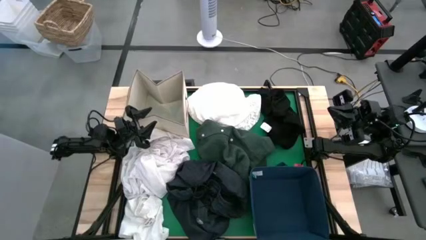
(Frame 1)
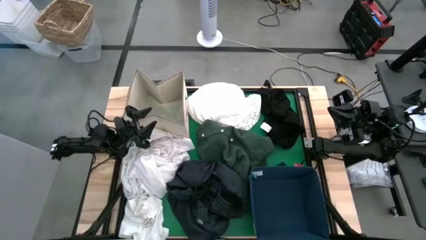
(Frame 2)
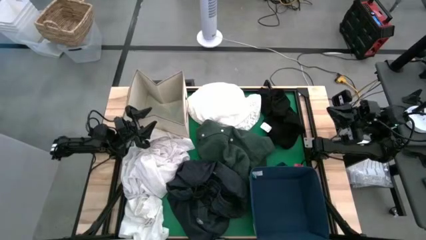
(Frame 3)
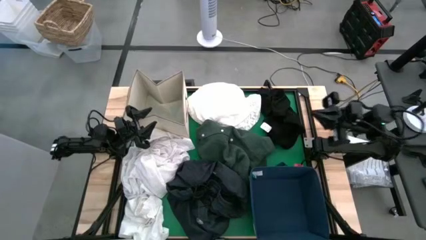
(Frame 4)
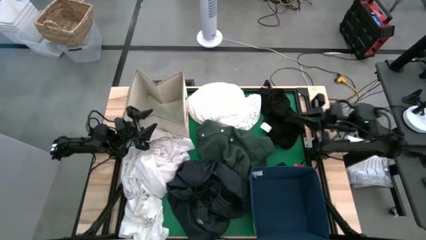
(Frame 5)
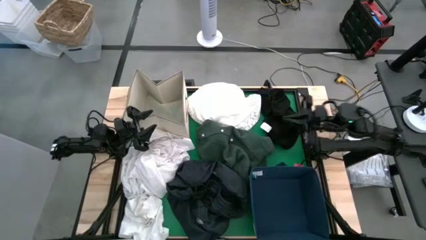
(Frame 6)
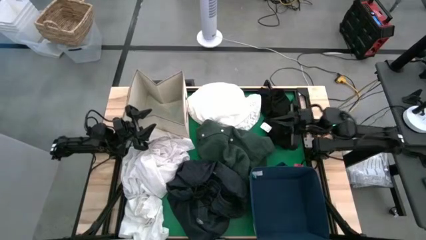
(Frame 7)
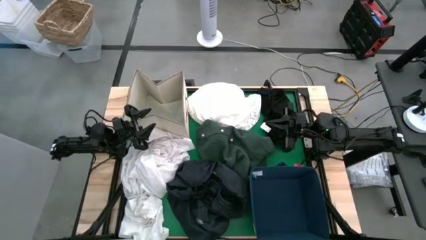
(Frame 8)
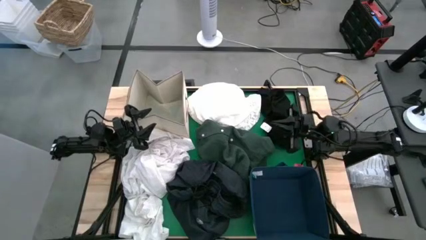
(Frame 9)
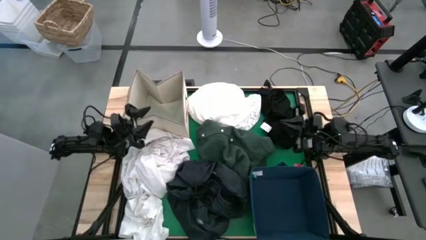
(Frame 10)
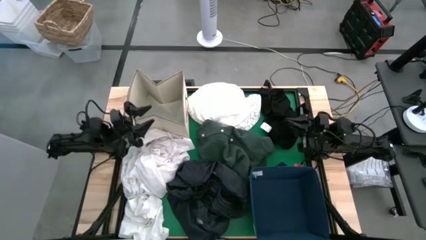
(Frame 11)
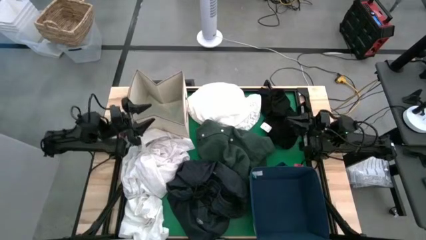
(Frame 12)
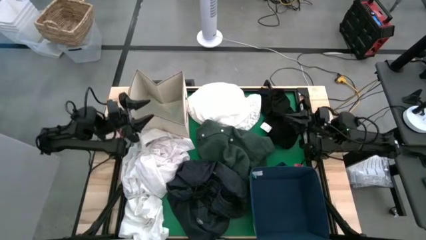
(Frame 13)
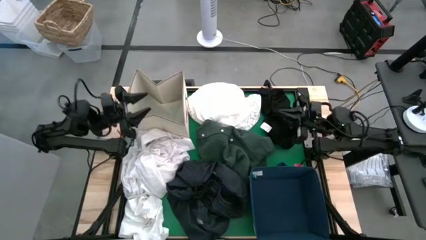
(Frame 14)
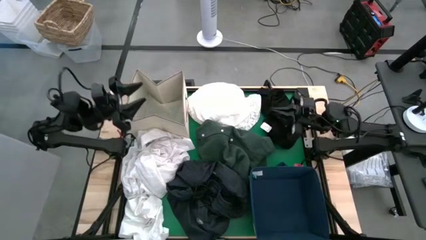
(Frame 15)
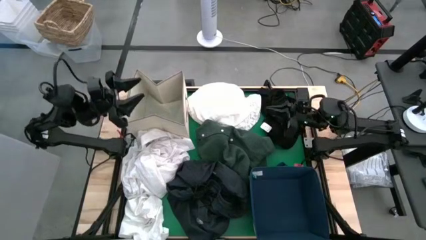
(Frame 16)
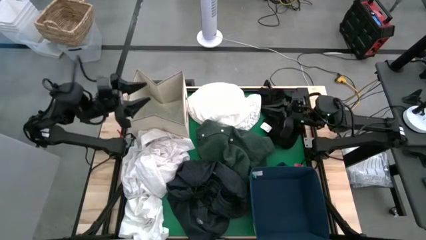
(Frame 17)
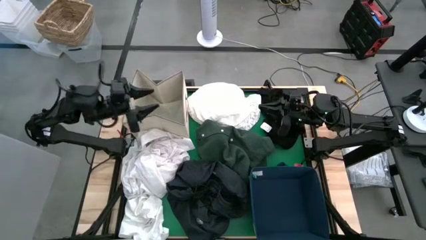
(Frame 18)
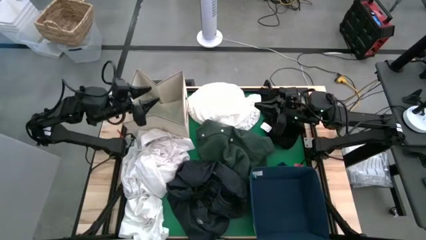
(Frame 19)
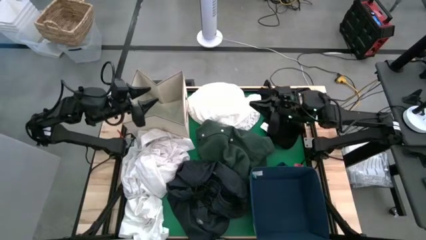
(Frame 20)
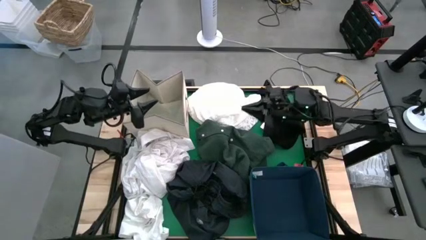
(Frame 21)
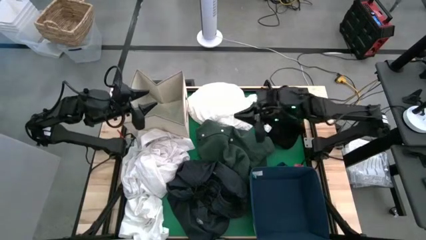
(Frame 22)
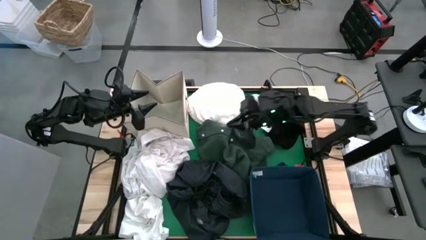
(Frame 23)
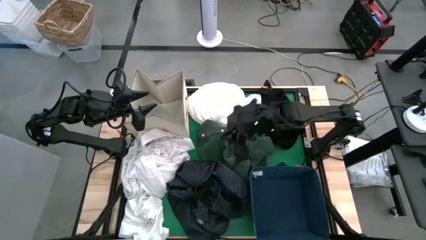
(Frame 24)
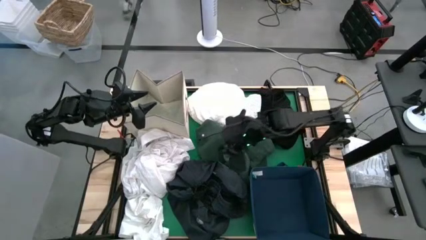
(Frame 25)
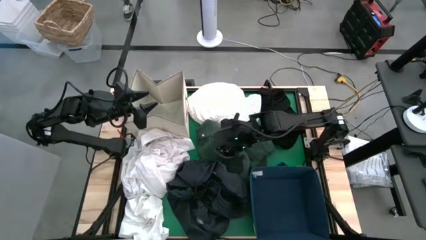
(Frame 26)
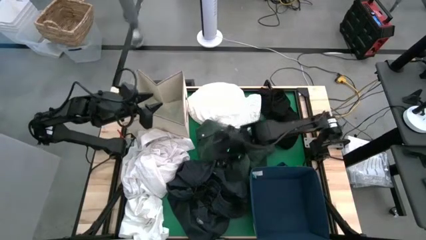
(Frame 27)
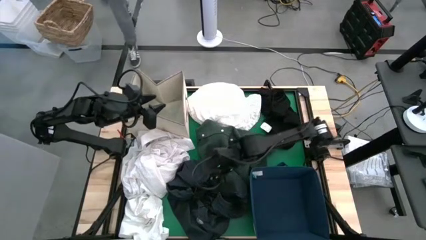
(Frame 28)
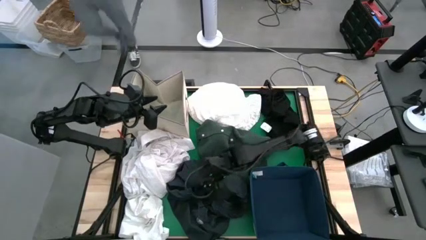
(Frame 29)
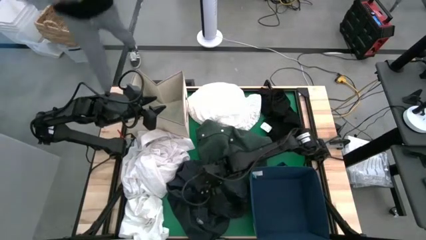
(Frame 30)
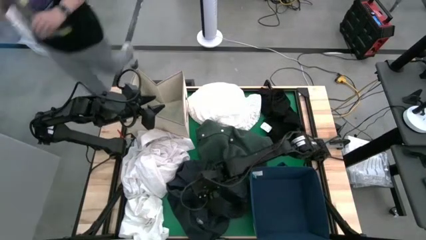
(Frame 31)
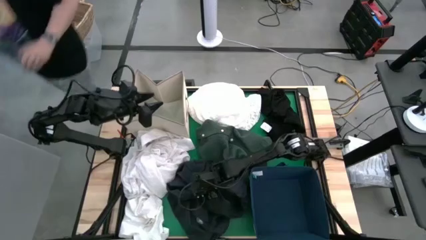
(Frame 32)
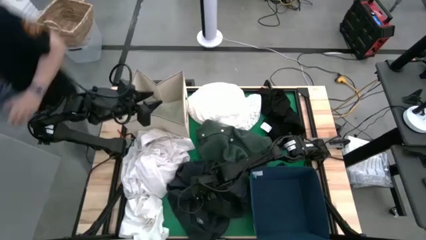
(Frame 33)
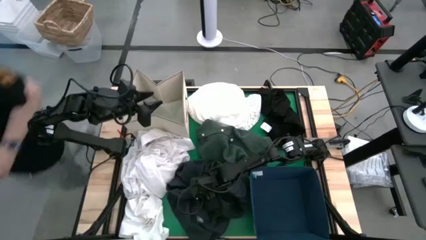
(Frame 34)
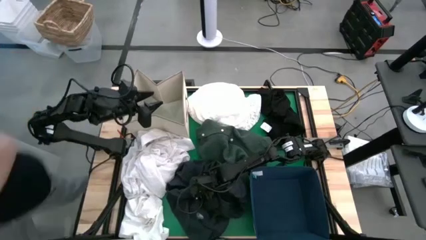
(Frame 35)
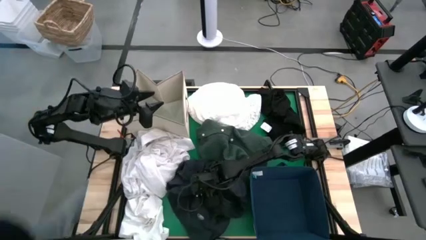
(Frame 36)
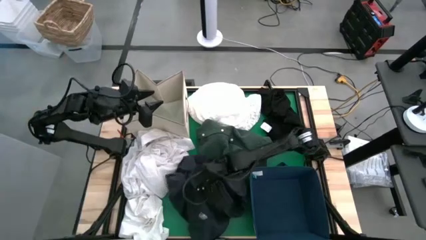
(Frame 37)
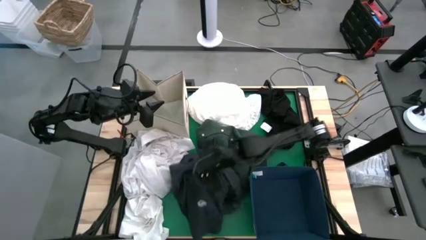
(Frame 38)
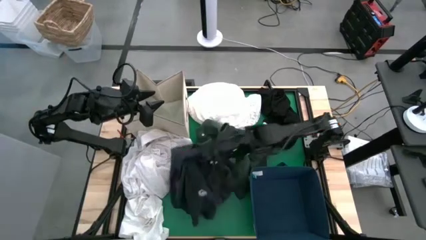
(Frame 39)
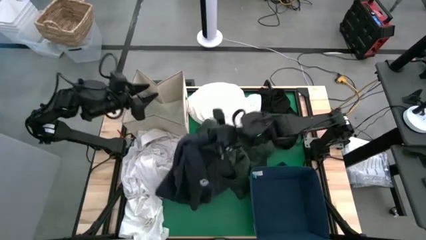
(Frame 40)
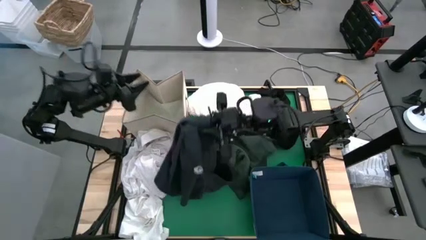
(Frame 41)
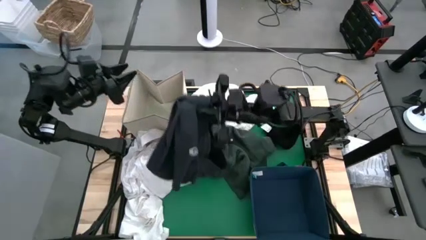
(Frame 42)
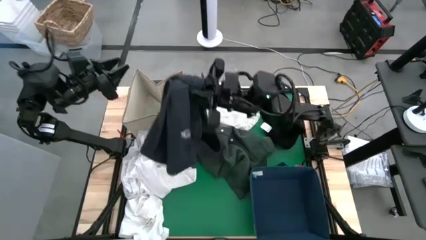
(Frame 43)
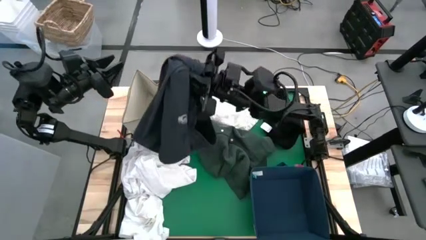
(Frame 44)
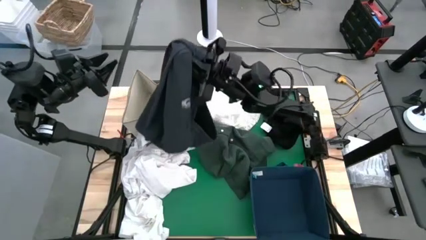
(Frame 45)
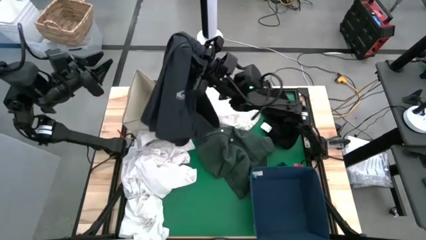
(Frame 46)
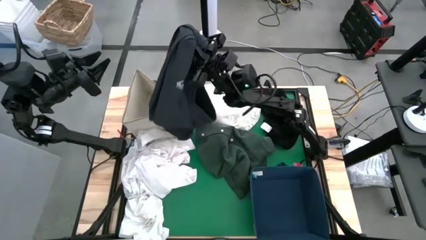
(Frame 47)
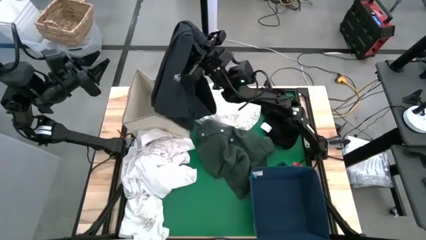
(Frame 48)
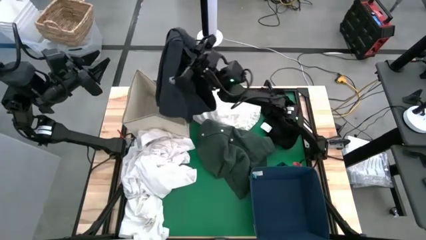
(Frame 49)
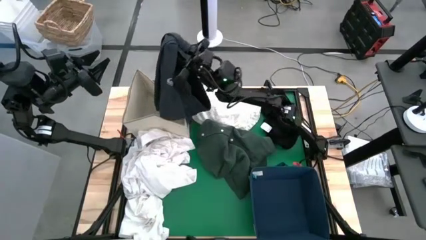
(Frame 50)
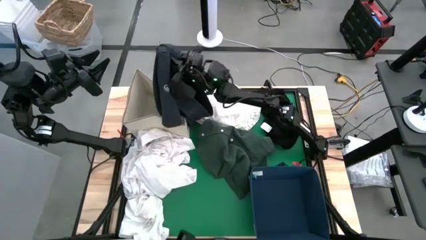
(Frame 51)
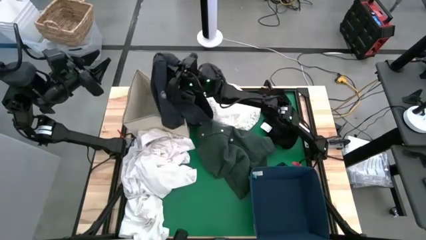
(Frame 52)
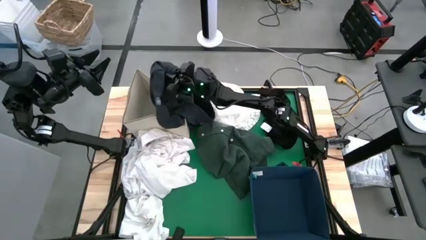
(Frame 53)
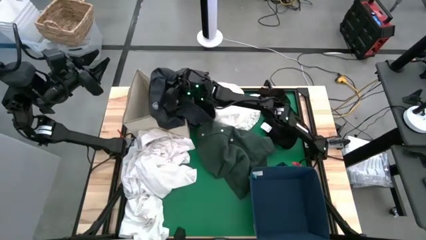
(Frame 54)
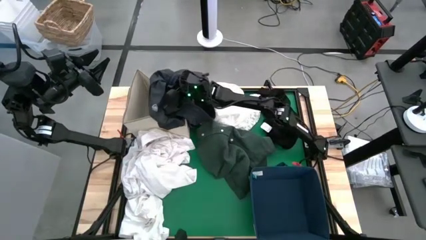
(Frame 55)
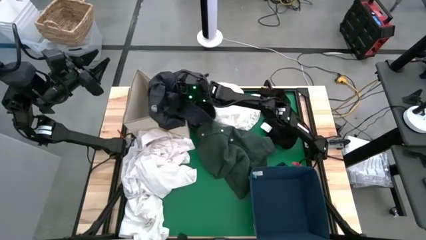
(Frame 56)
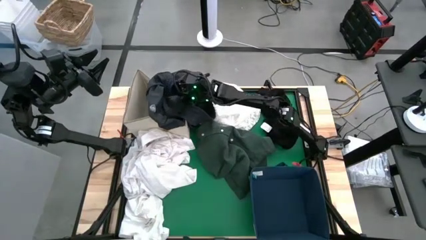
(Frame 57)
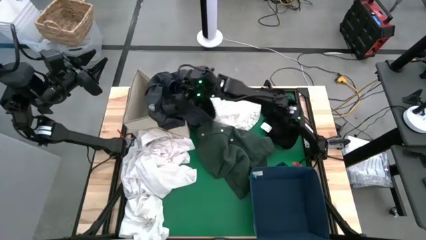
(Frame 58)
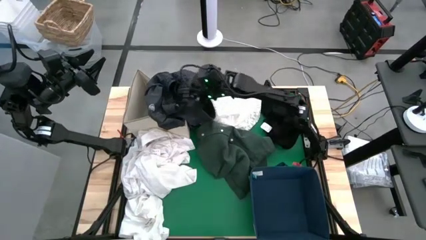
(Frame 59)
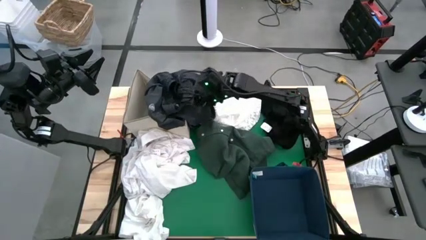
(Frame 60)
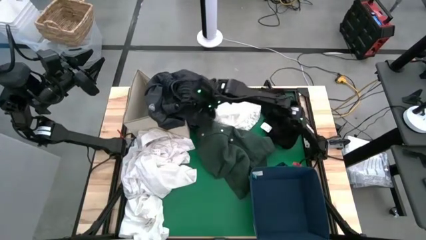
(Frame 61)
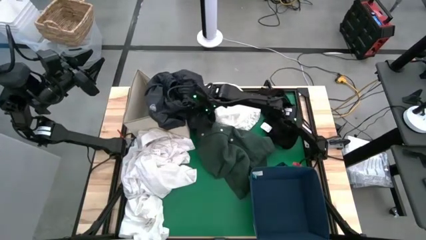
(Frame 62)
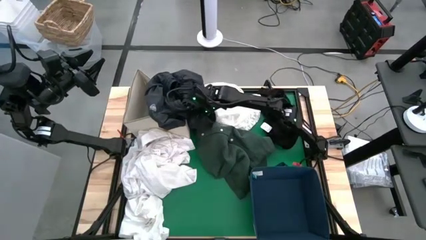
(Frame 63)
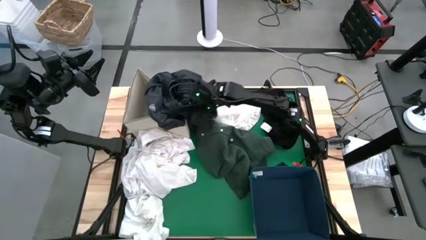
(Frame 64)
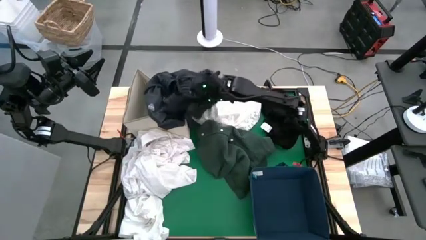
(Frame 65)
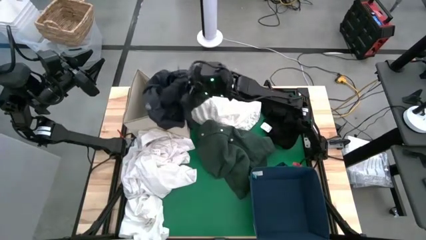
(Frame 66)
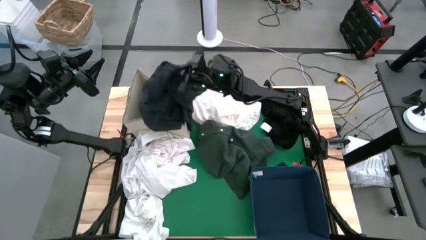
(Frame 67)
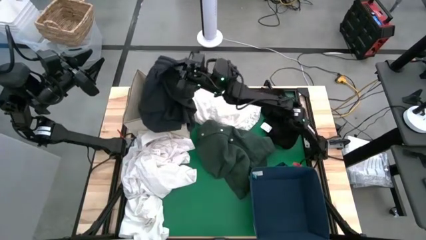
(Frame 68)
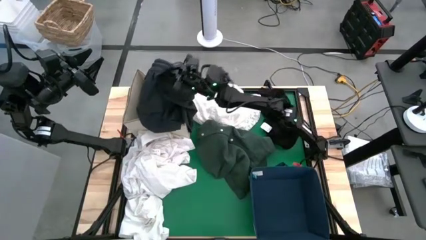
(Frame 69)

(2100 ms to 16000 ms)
Put the black cloth into the white bin
